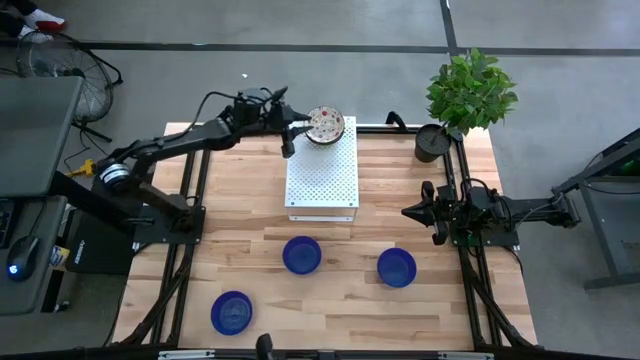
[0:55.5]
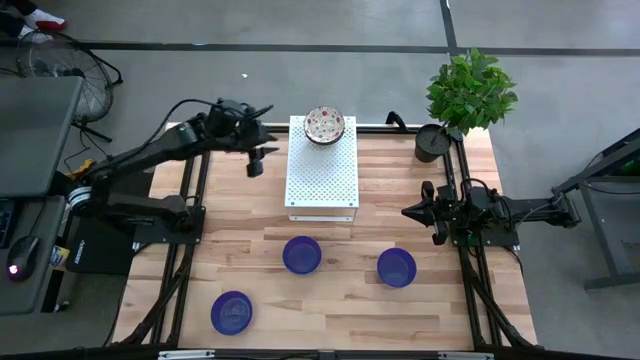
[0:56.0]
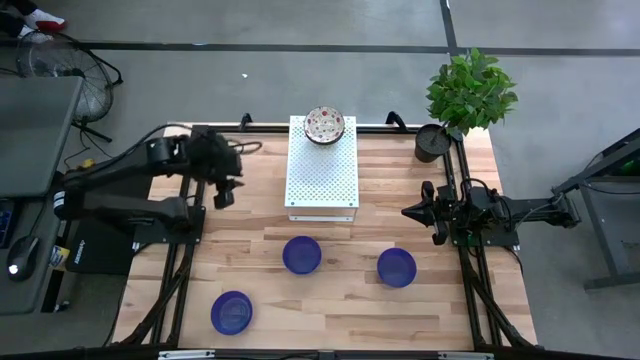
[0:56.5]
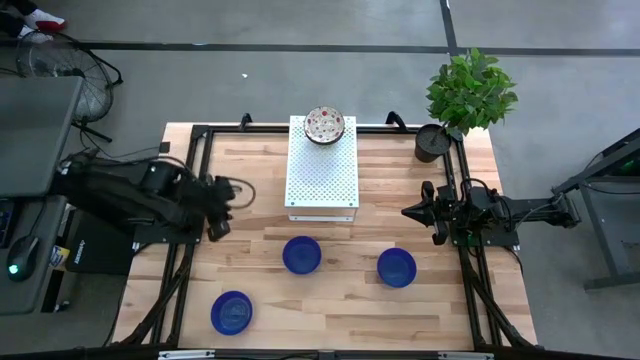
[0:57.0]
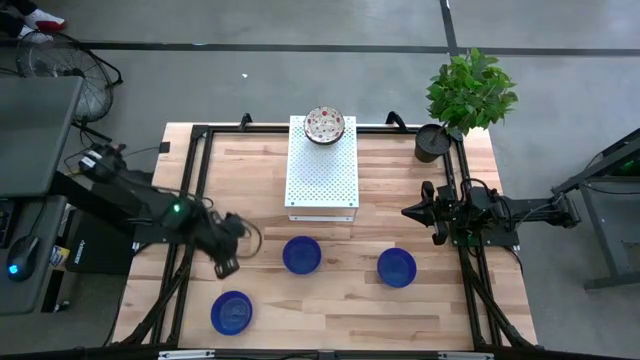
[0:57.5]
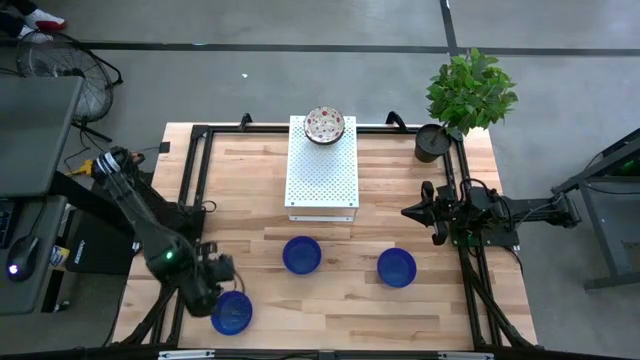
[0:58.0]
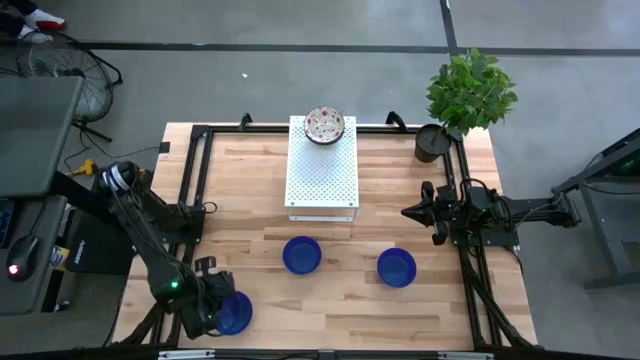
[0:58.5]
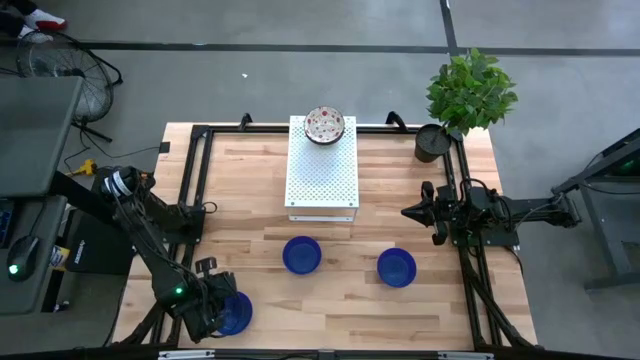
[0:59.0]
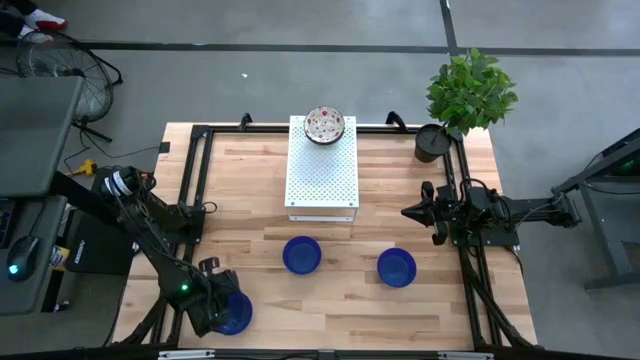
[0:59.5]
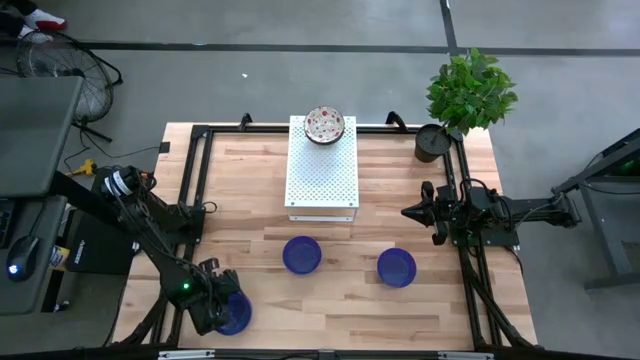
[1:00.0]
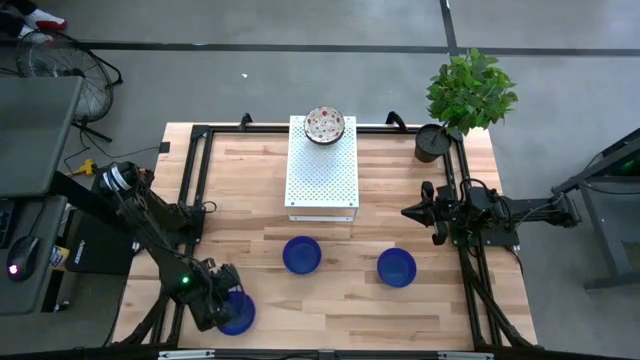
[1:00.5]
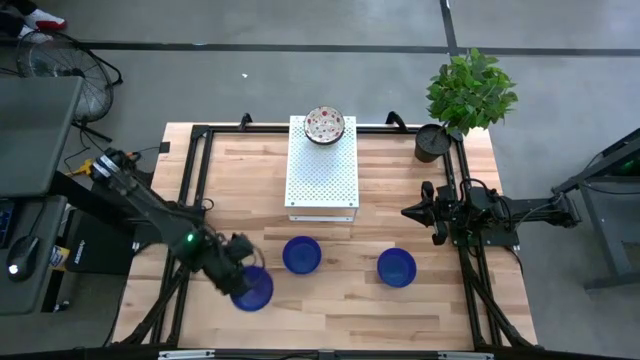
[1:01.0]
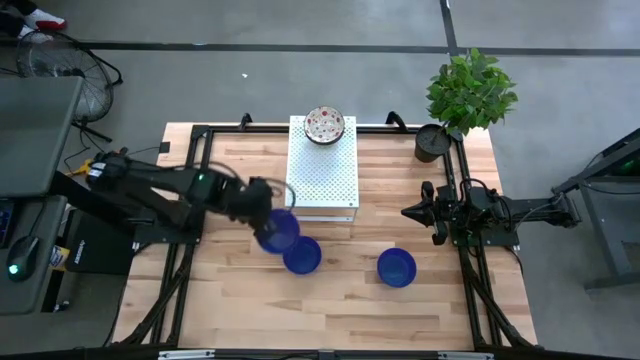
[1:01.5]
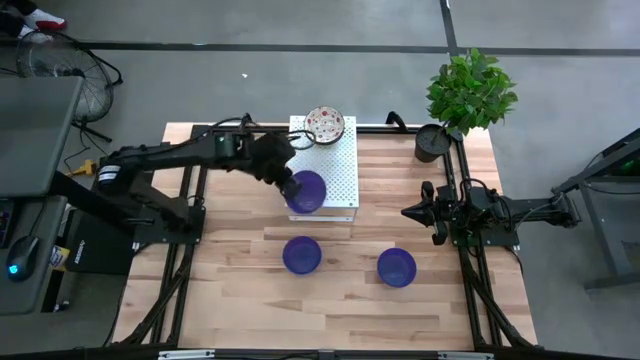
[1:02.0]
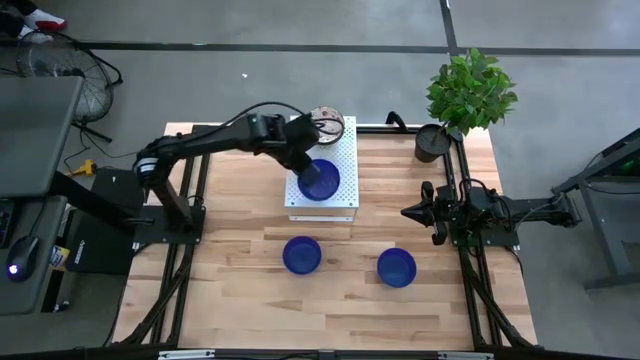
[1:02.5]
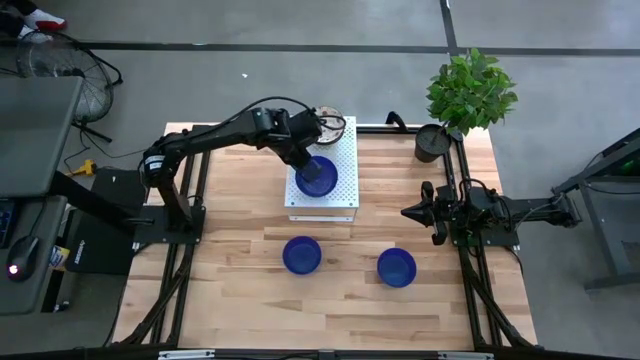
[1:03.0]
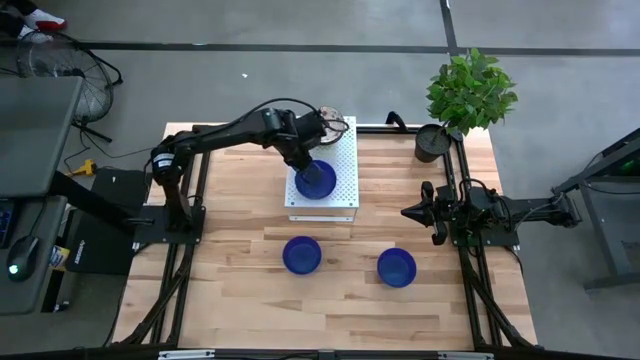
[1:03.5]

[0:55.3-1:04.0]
Task: Pick & Place Mini bowls
Put the bottom left violet bowl on the shelf

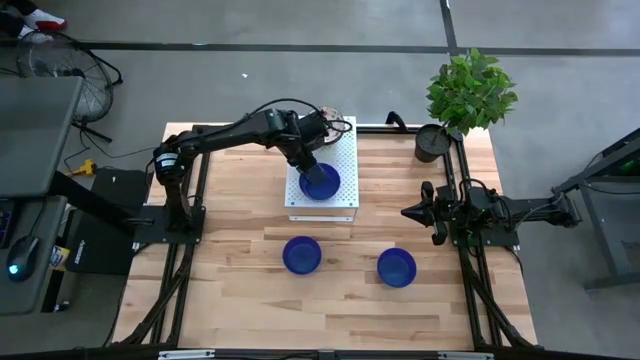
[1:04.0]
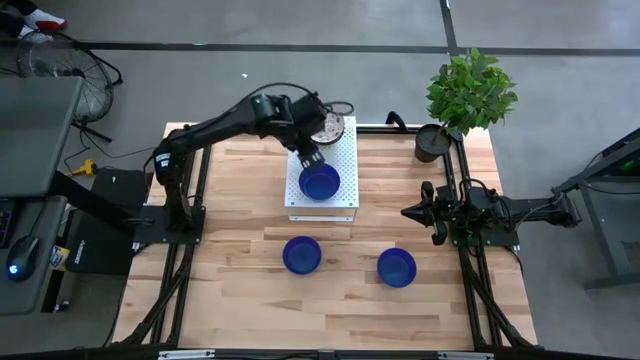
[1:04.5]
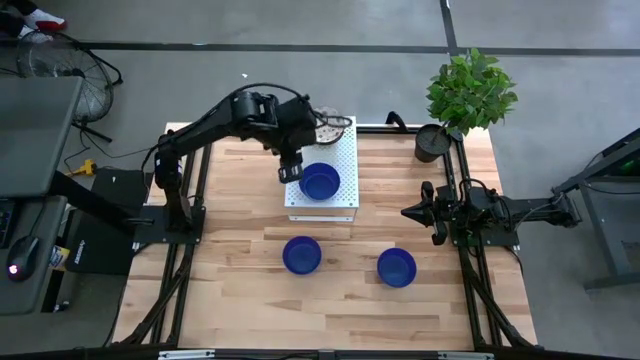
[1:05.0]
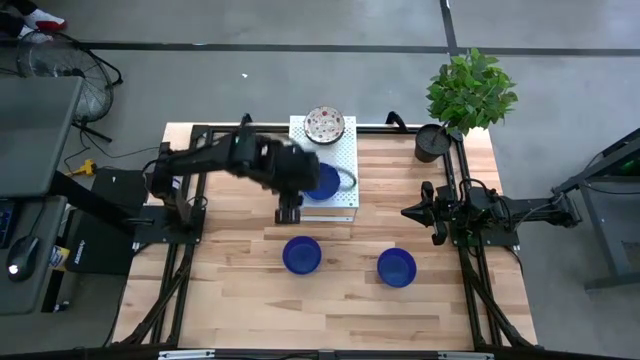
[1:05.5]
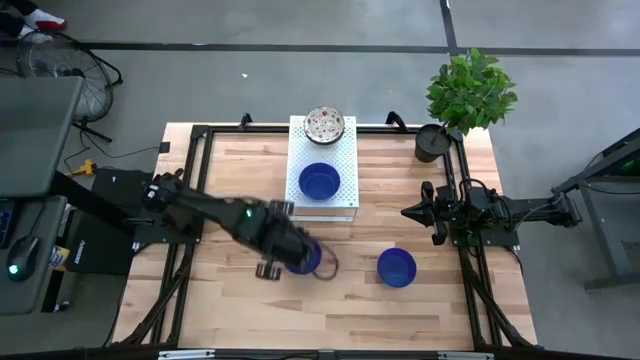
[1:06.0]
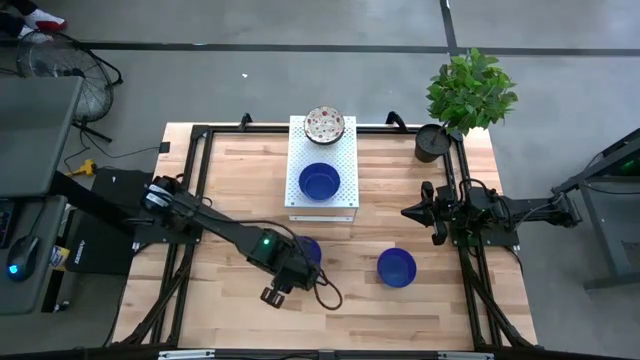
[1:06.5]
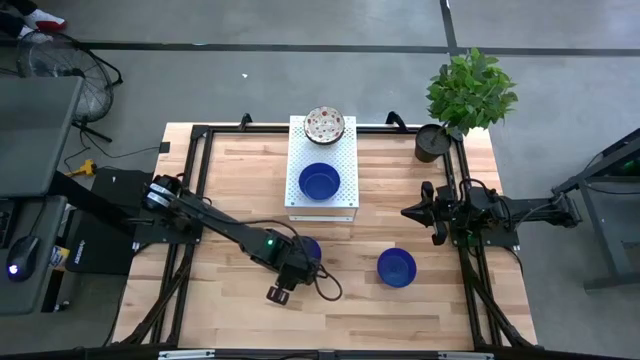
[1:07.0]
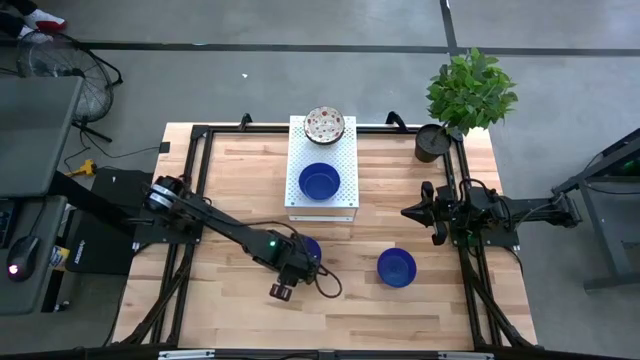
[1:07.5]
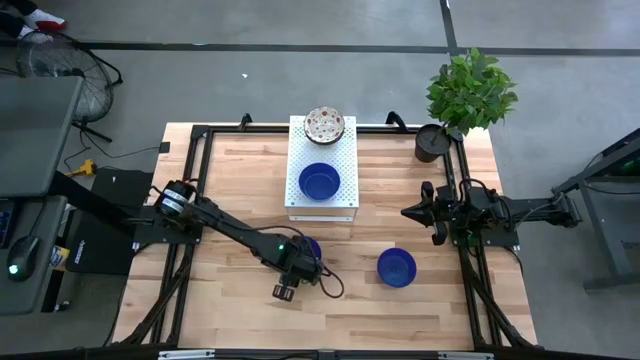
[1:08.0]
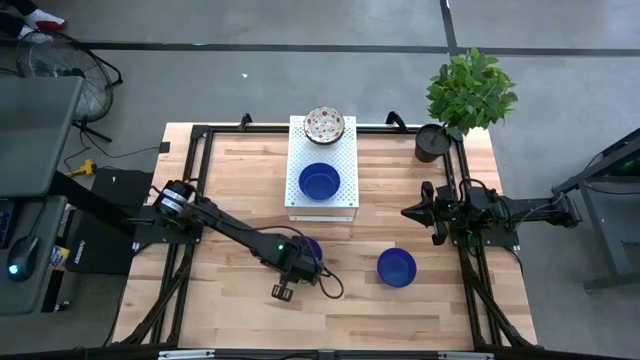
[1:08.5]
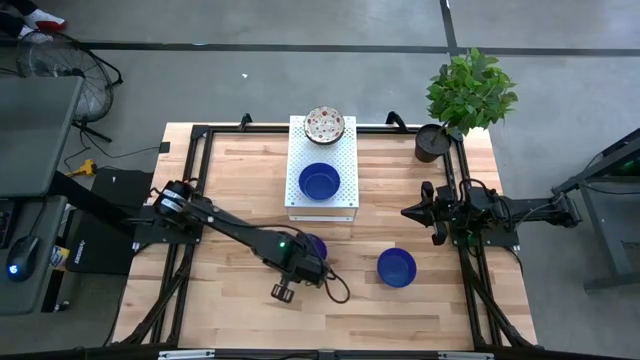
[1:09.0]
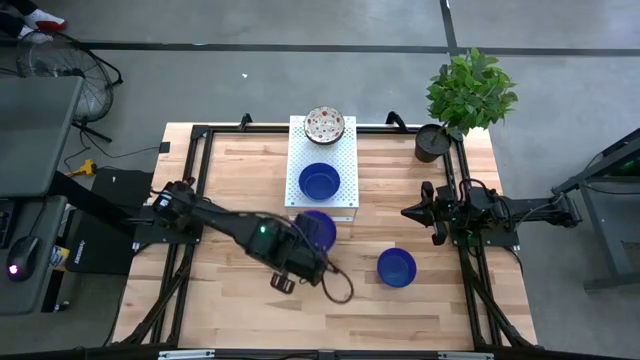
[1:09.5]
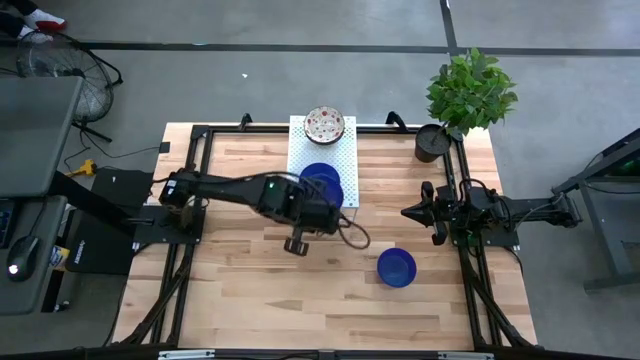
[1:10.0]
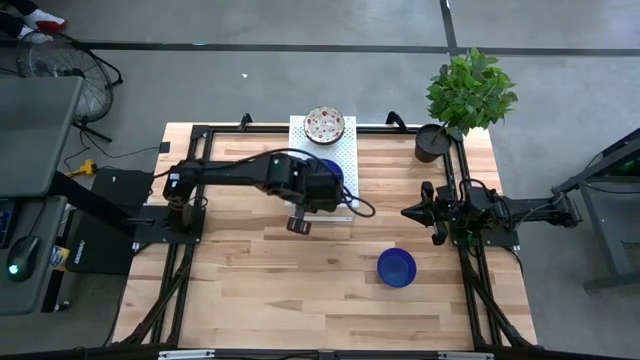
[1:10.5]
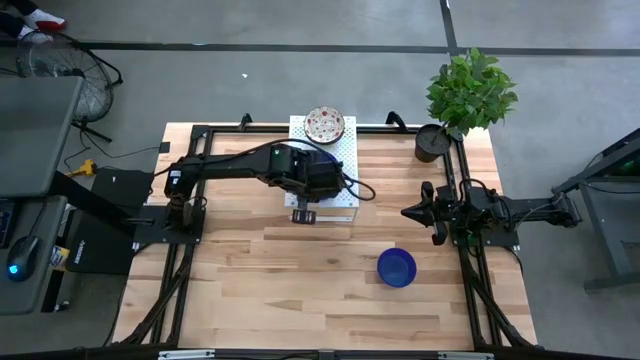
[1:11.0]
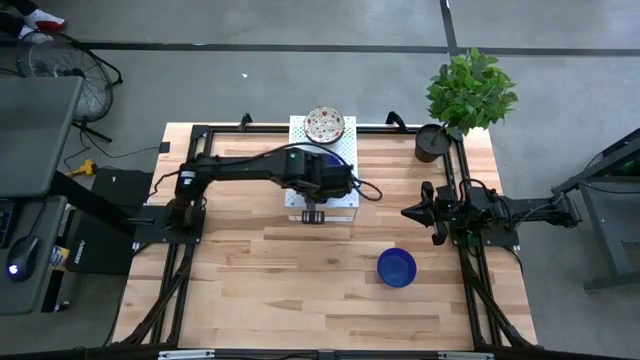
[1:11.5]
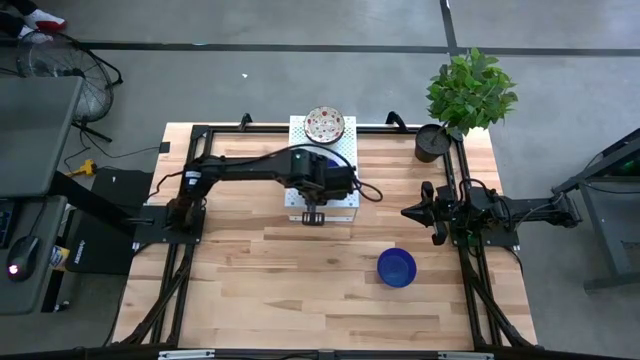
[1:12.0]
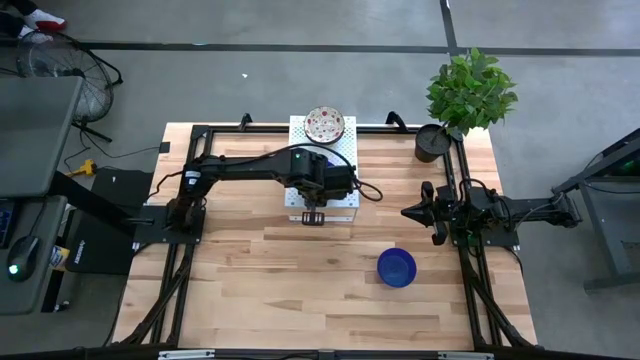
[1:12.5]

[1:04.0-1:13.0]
Stack the left violet bowl on top of the violet bowl on the shelf

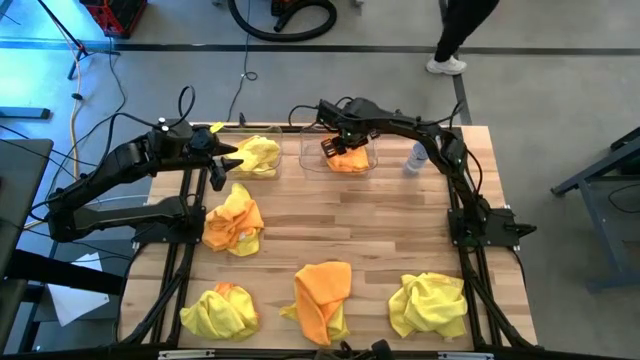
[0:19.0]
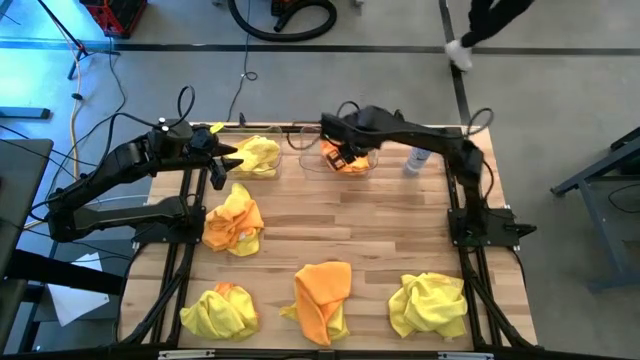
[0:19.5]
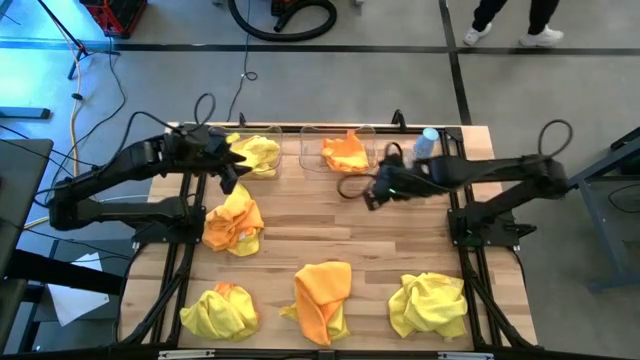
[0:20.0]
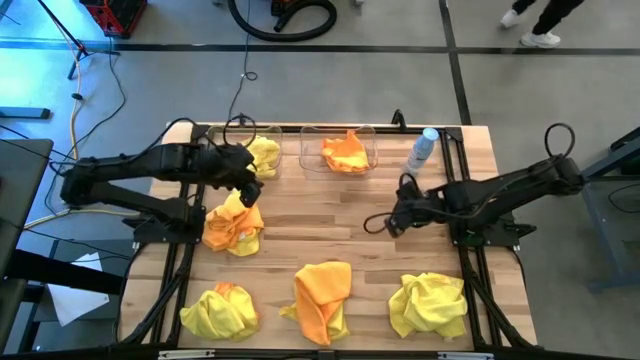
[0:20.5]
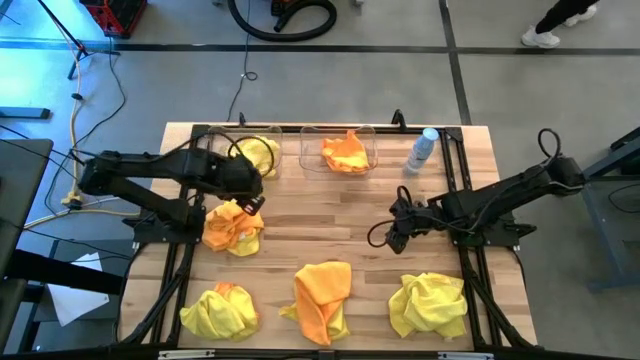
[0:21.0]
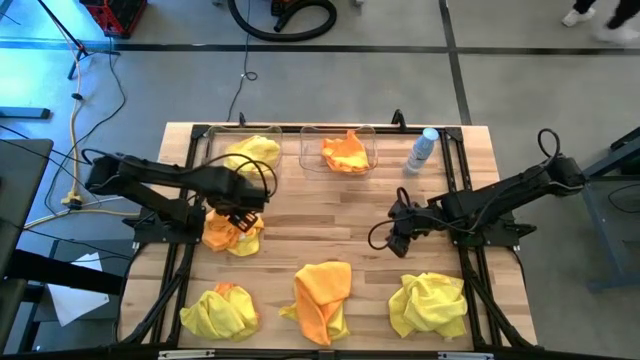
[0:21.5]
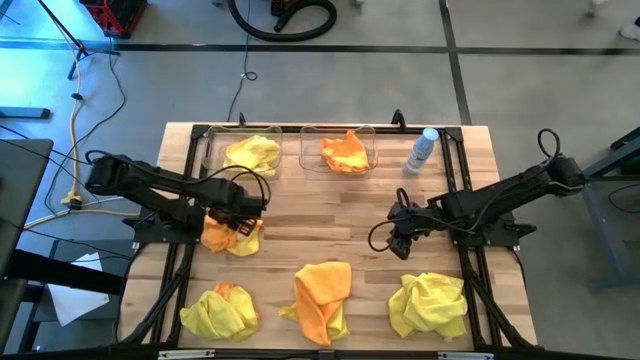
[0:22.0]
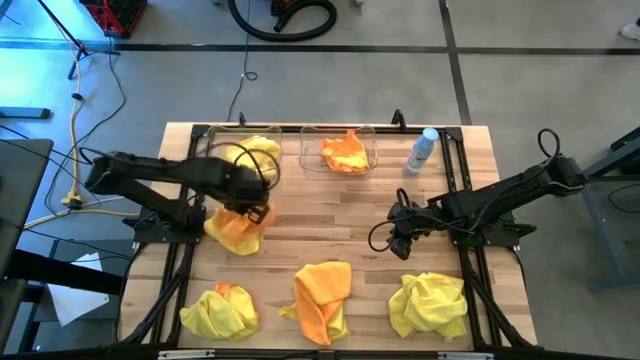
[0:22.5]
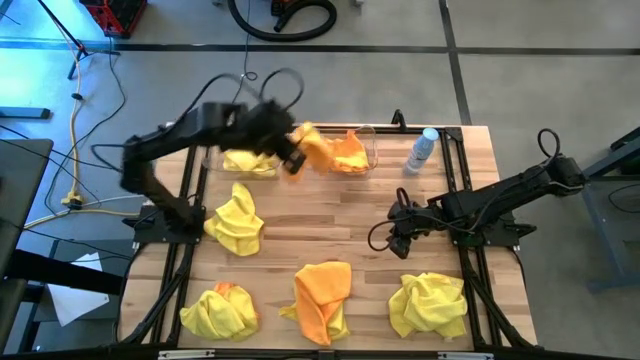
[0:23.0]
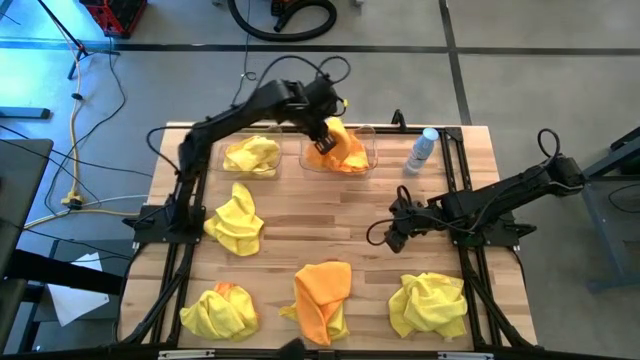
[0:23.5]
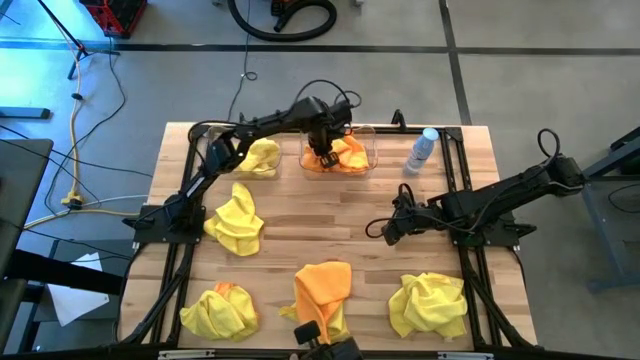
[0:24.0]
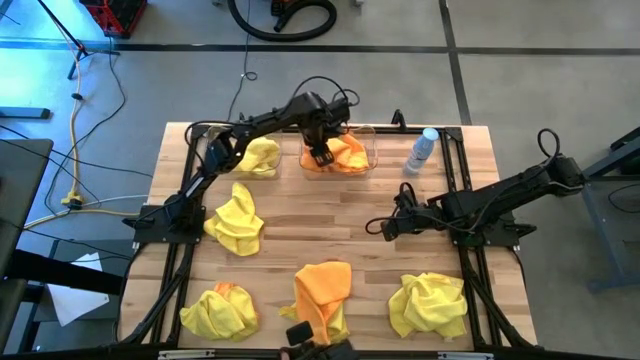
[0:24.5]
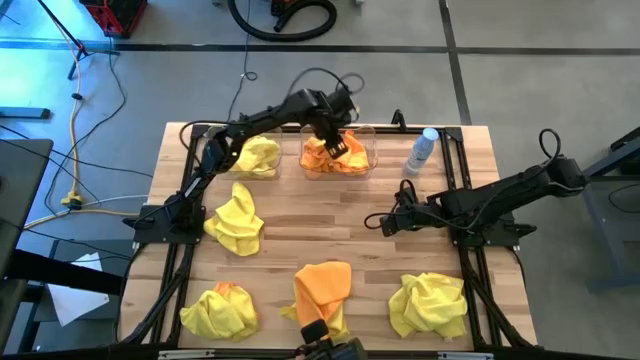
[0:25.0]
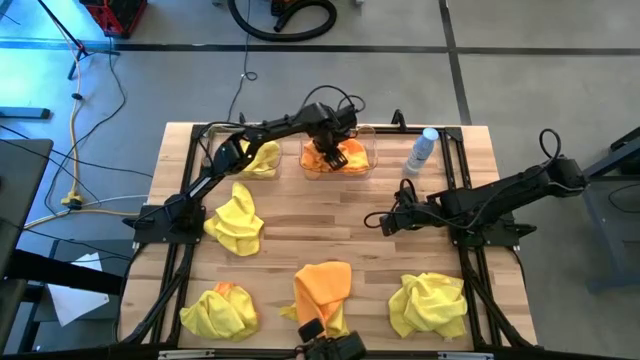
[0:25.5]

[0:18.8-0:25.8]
Task: Sort microfiber towel by color & place in baskets
Put the orange microfiber towel into the right transparent bin
